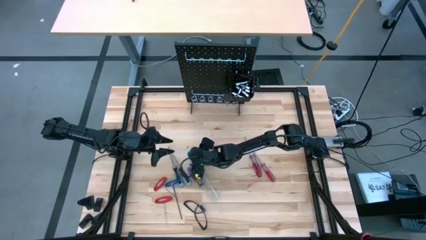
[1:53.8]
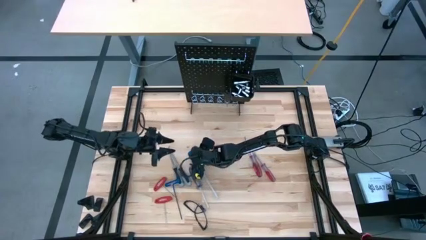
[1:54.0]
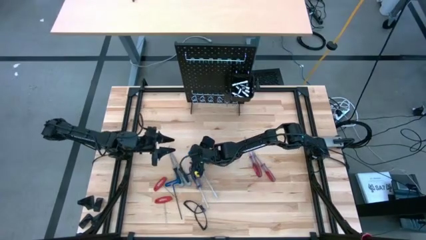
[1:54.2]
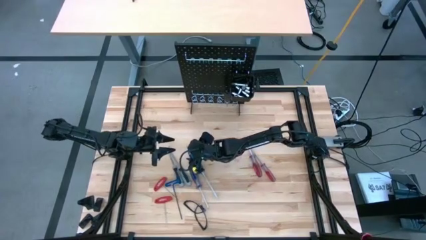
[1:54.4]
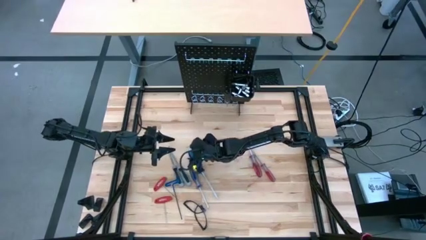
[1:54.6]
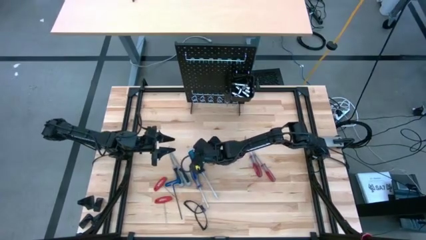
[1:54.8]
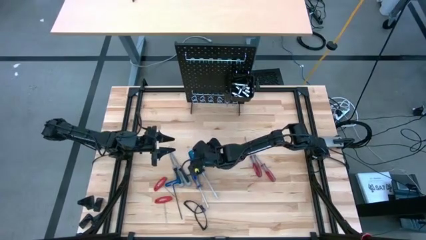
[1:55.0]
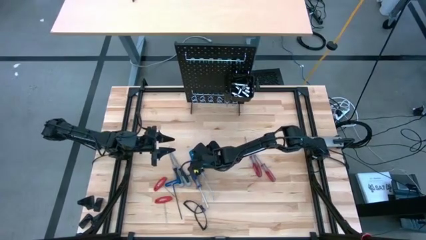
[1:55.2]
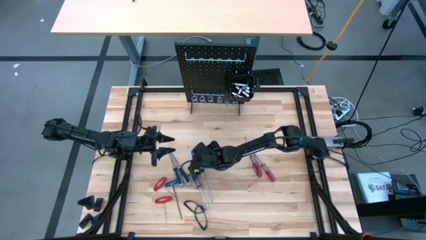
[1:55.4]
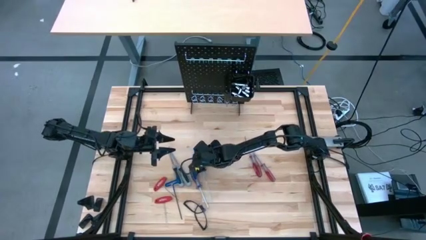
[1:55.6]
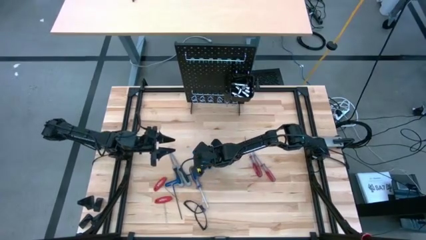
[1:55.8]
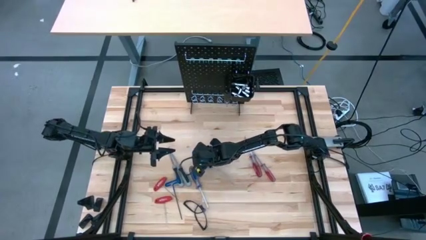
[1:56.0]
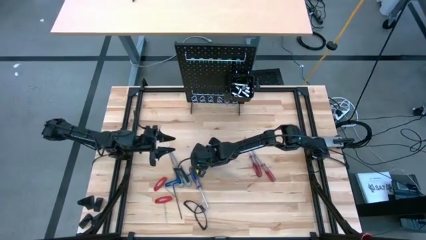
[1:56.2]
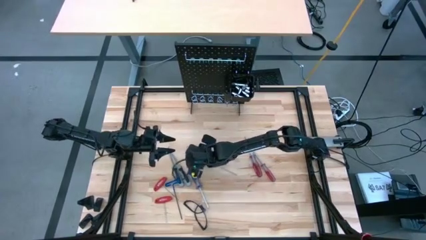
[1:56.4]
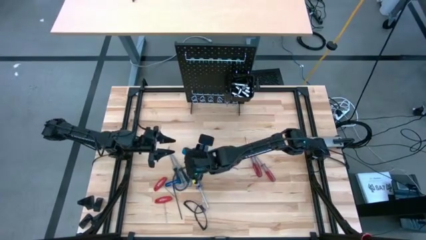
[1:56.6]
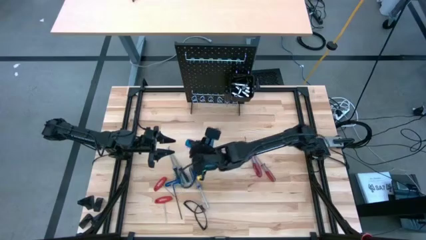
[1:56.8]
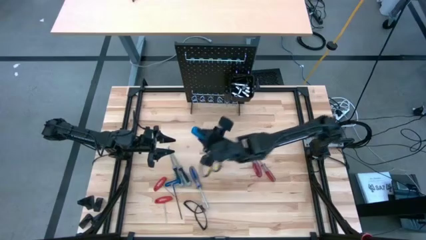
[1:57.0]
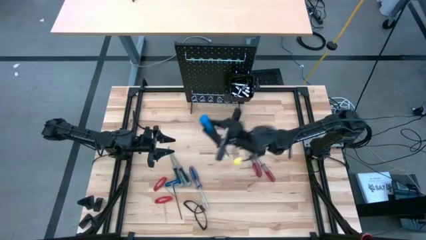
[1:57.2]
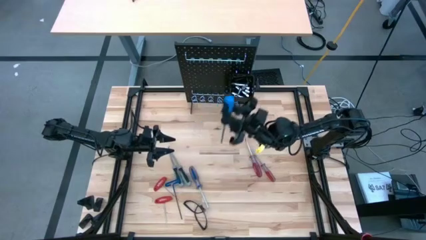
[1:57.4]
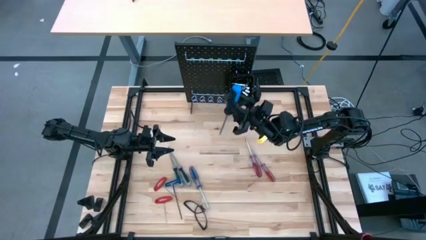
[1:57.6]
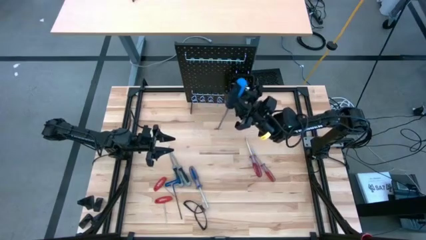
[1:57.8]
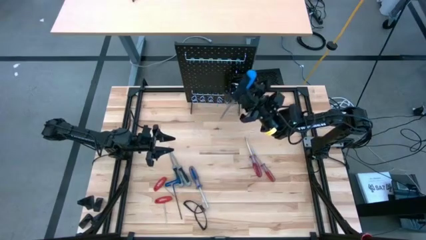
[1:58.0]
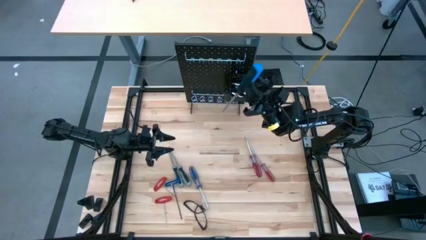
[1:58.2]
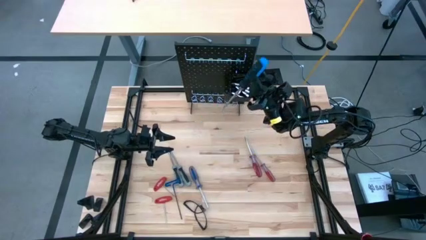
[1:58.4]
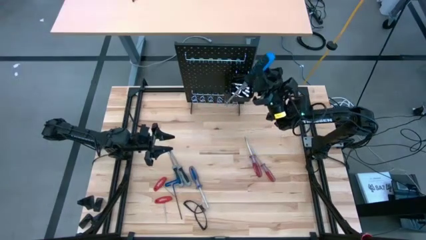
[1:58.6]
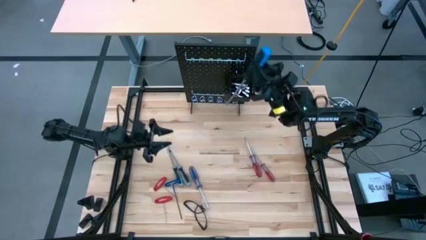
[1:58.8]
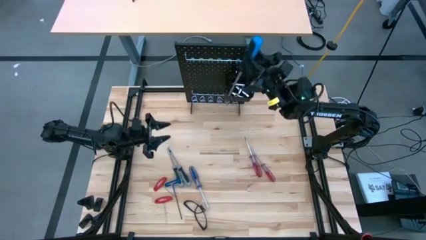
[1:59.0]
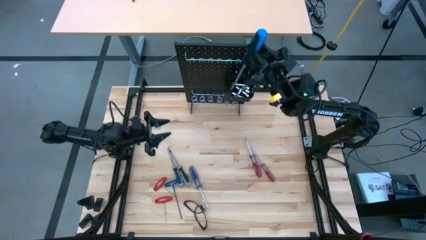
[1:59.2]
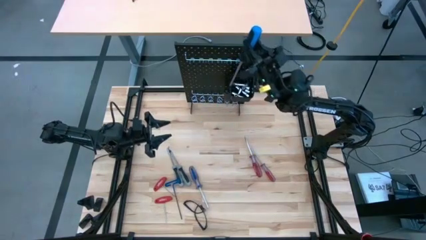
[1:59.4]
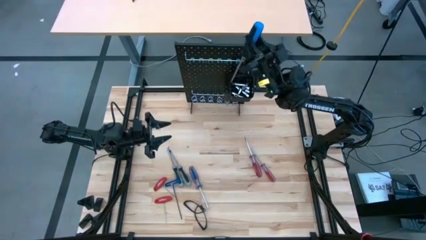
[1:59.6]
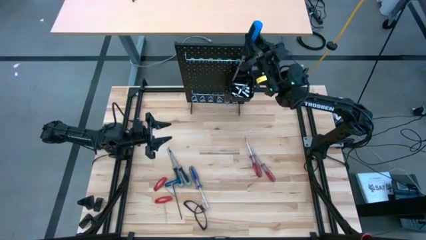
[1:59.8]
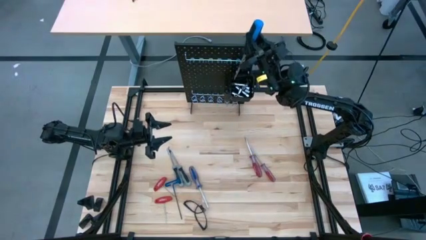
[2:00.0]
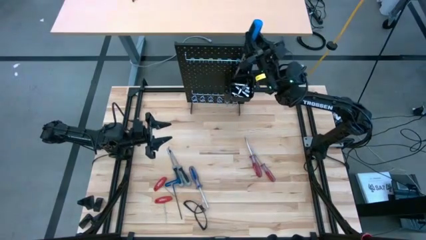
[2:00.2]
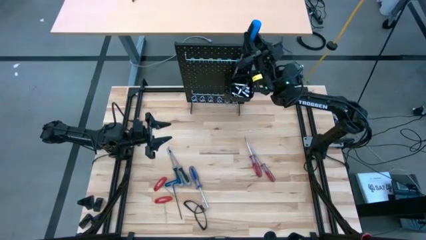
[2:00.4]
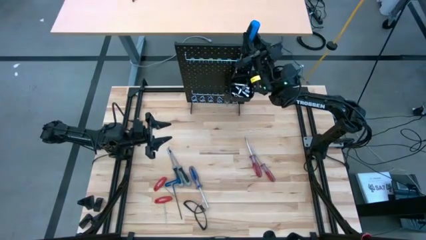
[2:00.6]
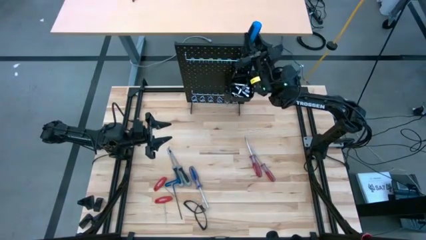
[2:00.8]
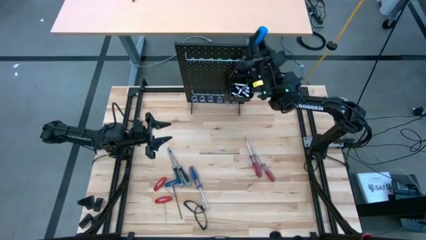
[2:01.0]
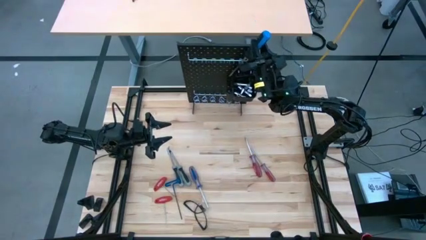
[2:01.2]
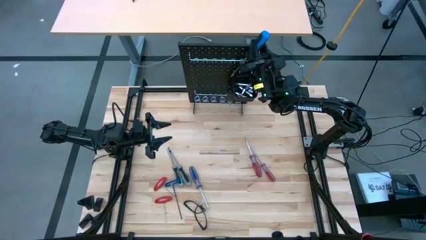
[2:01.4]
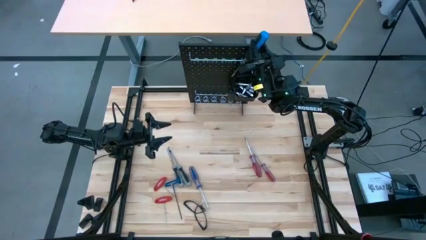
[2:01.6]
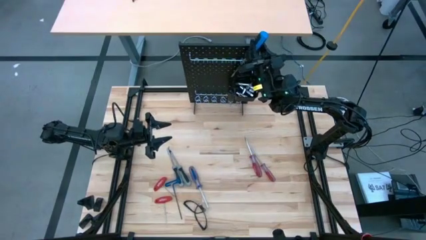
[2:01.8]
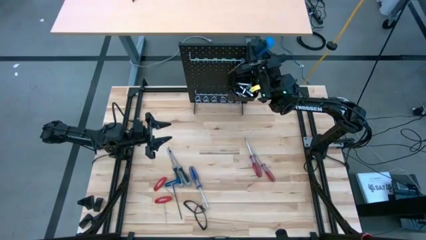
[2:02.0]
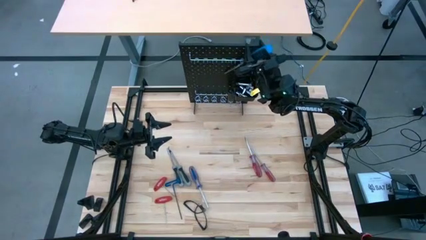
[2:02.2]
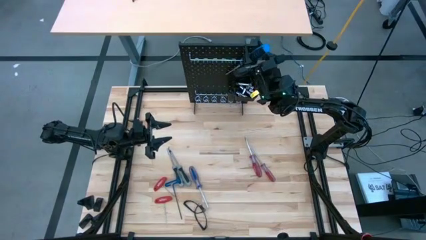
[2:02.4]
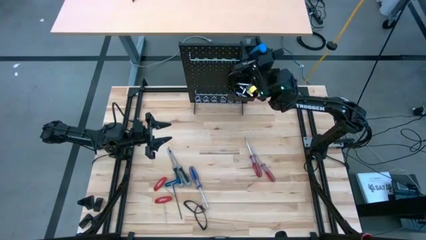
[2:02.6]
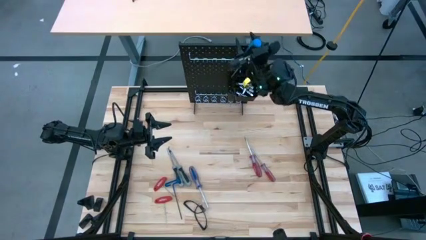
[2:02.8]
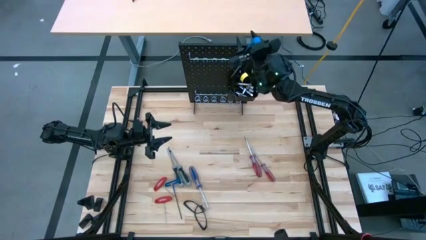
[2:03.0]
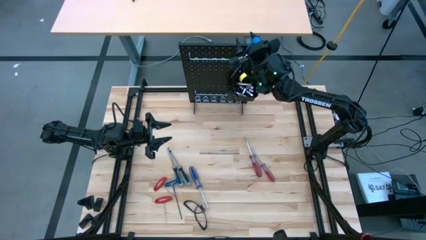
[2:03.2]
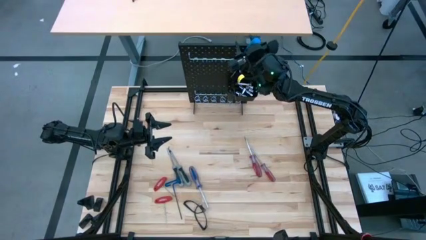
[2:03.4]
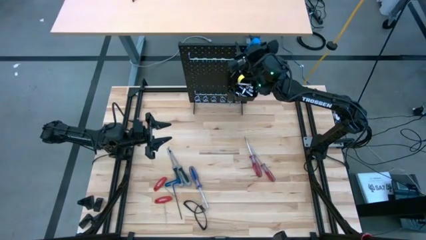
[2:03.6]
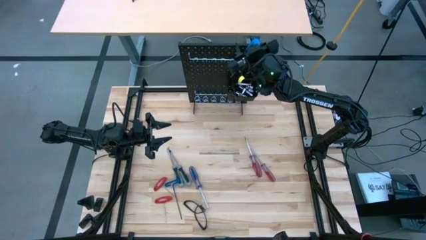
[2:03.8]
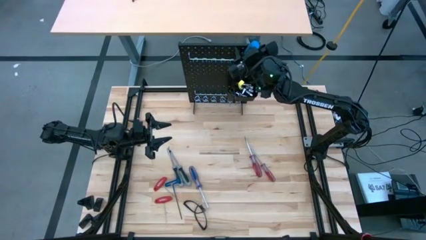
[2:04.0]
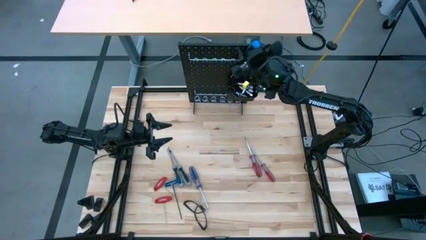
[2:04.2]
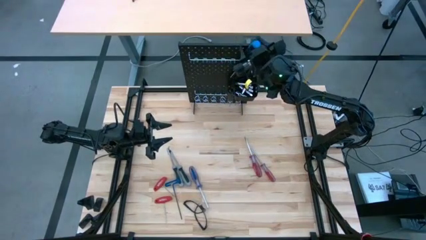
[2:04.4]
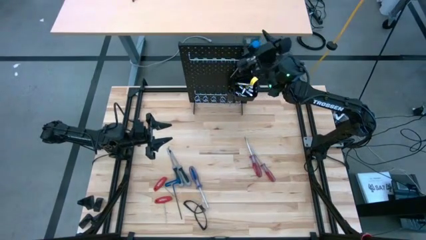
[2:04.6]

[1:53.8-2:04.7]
Task: Hang tools onto peg board
Hang the blue screwdriver on the pegboard

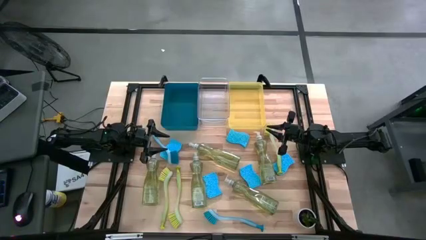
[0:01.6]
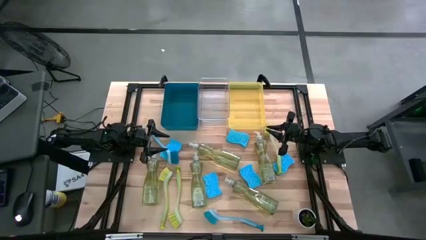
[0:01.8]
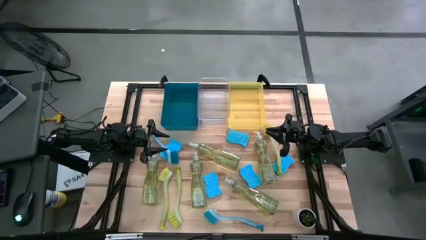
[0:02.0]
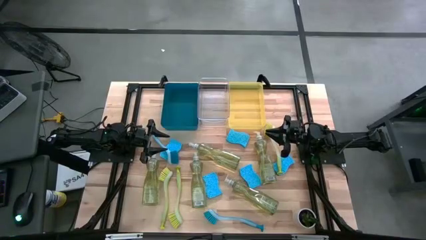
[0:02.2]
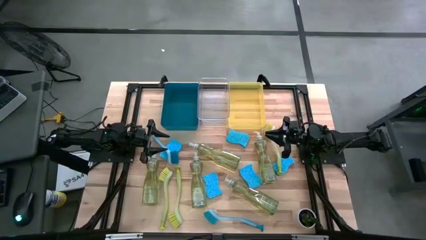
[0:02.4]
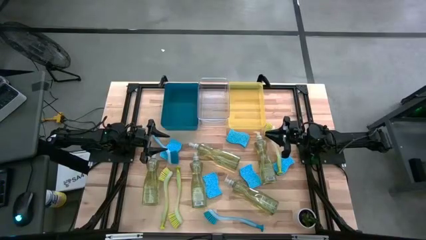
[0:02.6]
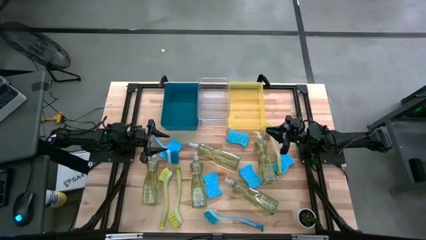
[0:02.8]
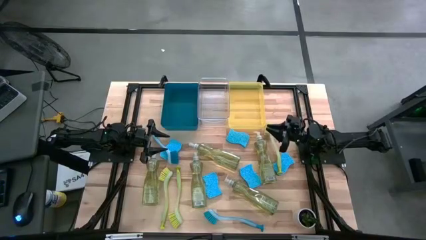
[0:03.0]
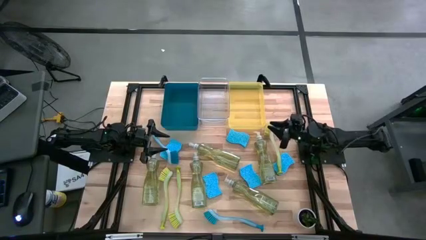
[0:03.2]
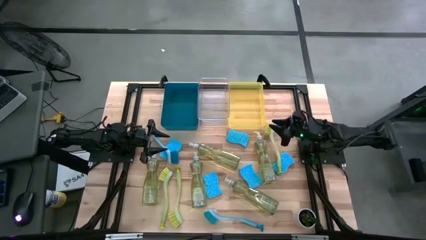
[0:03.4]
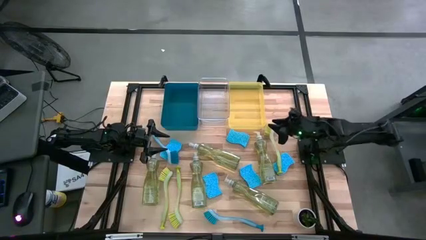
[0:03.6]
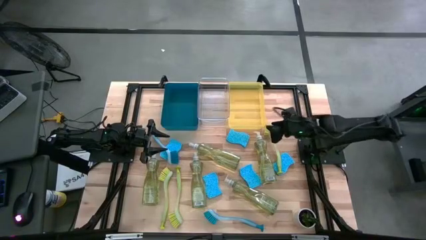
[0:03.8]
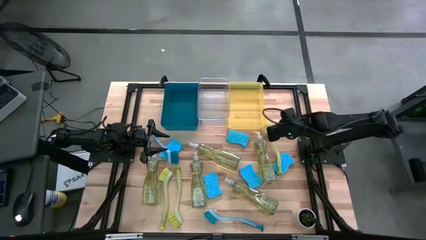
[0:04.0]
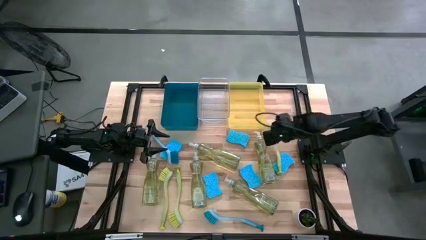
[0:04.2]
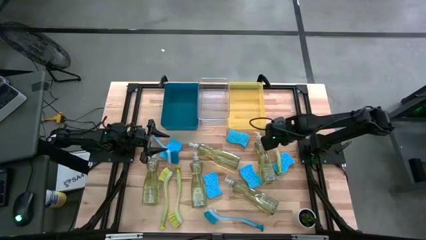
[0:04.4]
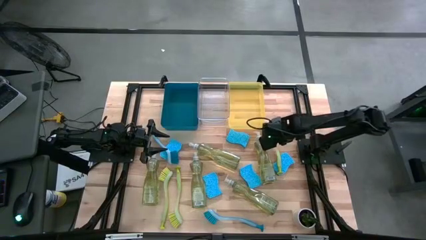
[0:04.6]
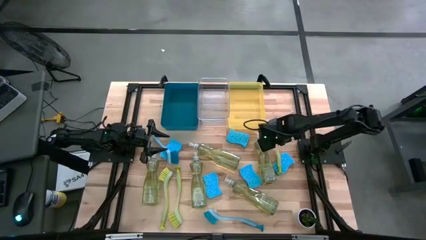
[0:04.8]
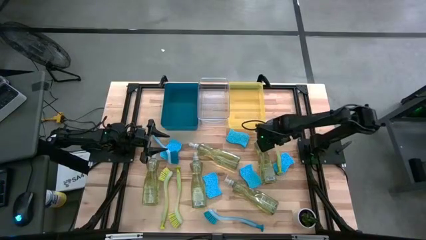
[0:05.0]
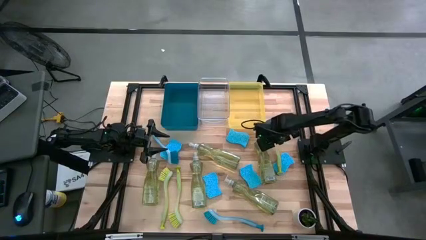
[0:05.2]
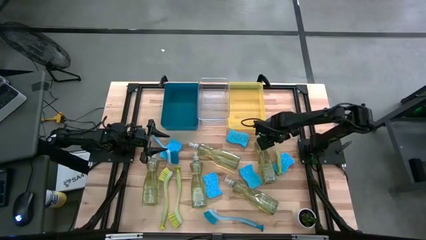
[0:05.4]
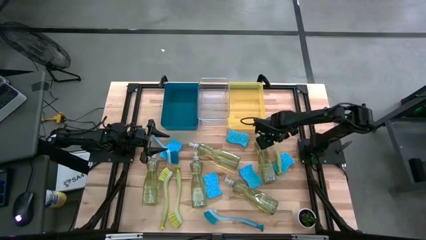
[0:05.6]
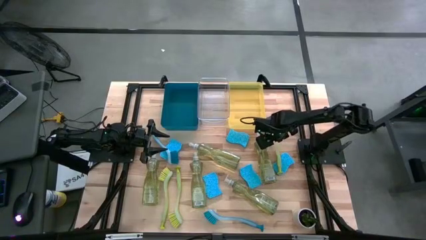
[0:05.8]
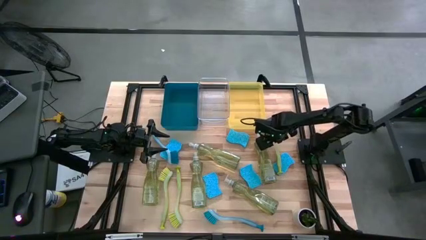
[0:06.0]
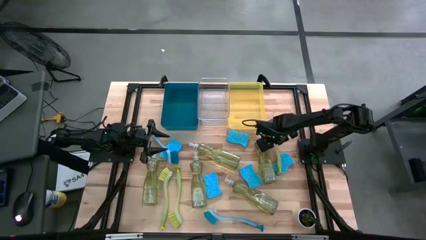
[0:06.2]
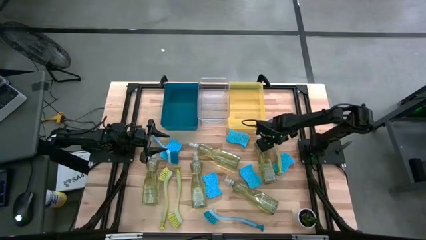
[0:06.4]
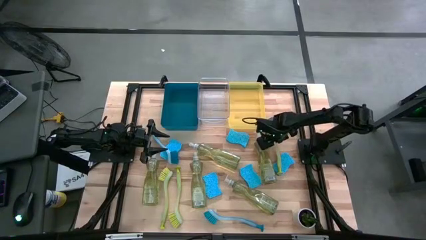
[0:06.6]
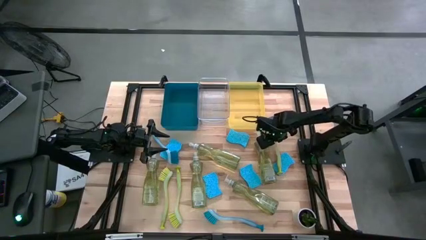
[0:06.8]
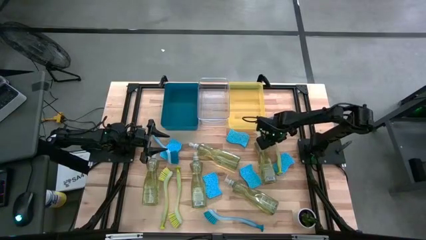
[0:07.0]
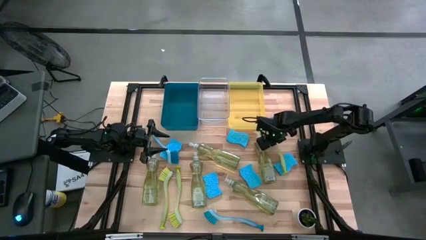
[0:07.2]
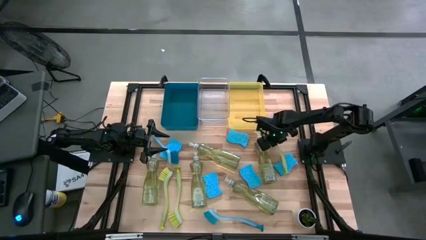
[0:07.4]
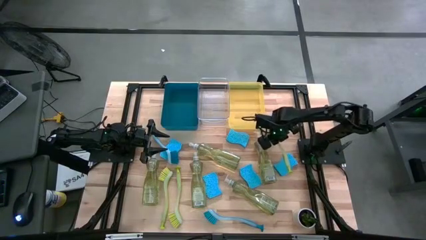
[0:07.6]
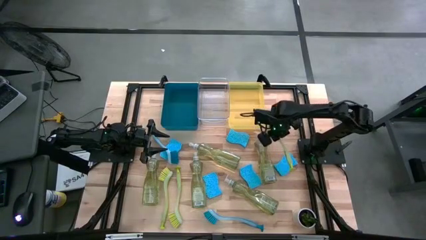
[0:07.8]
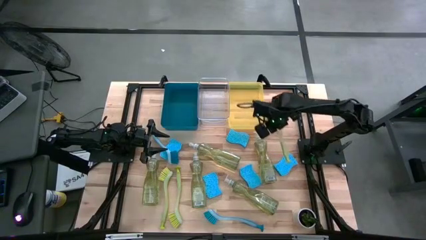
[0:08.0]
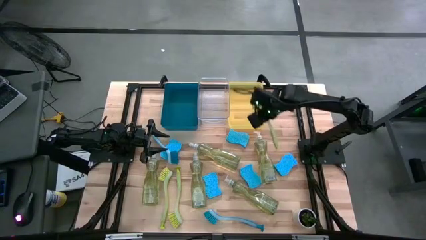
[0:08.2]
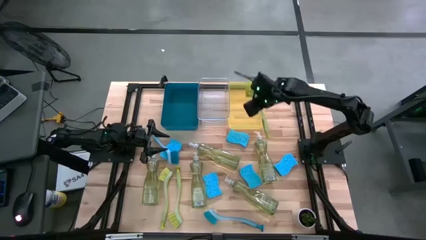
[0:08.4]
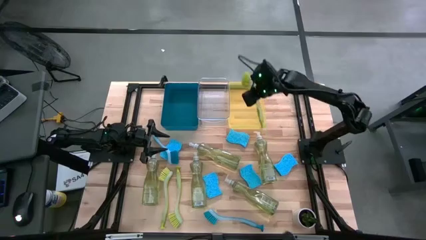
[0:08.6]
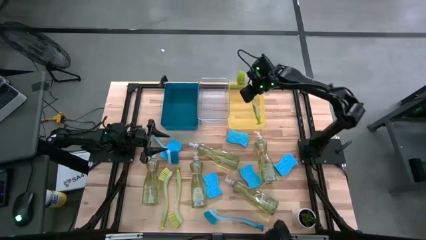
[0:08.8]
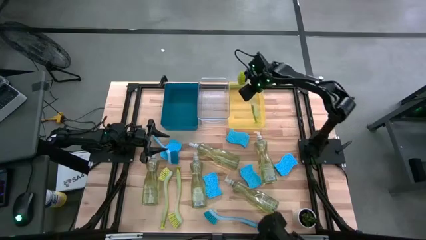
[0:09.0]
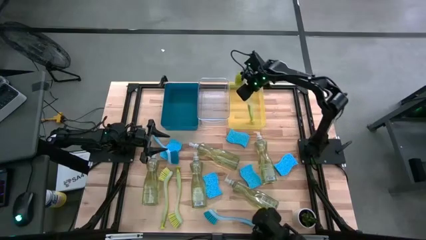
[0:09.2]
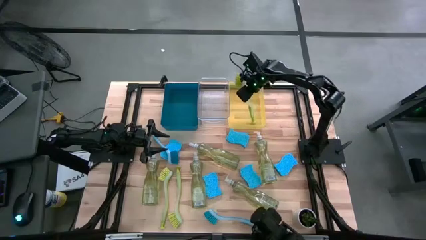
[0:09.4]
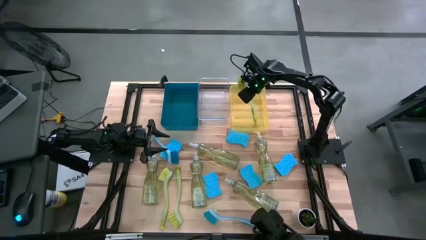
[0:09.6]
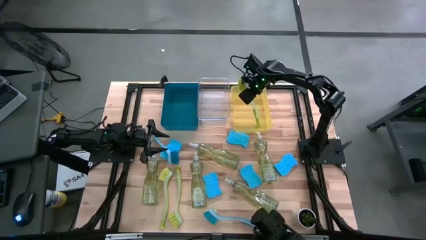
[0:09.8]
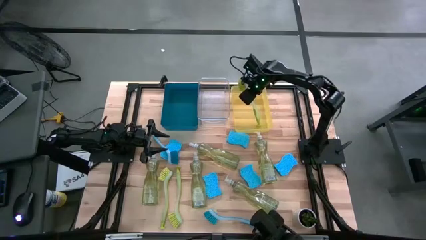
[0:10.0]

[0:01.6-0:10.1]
Task: Pick & Place Kitchen Sink Supplies
Put the yellow dish brush into the yellow bin
